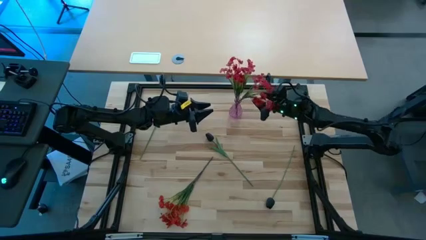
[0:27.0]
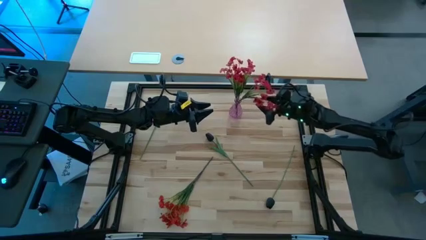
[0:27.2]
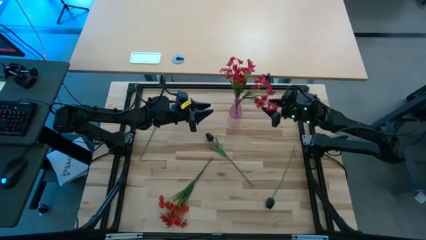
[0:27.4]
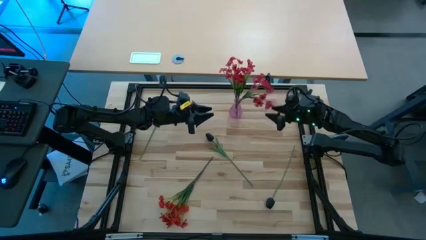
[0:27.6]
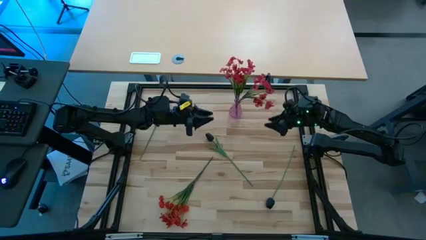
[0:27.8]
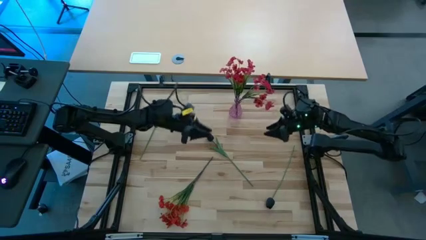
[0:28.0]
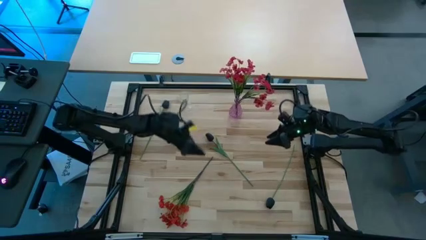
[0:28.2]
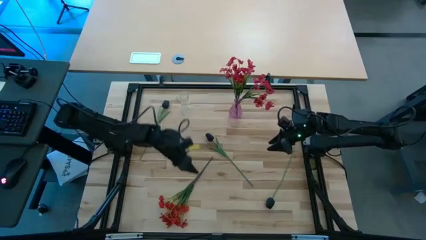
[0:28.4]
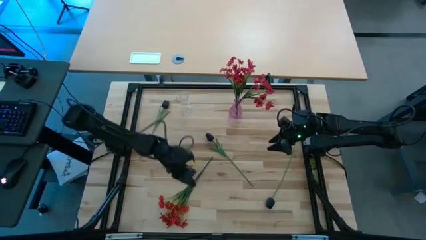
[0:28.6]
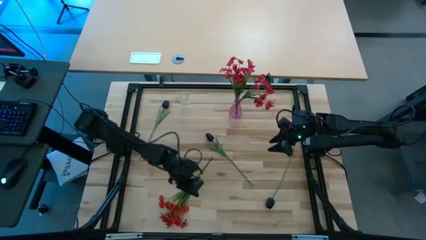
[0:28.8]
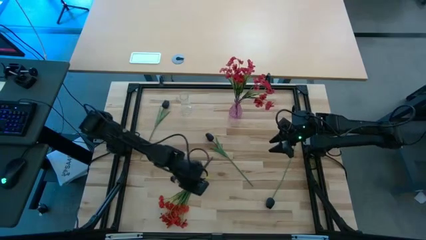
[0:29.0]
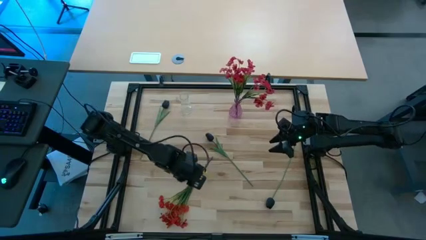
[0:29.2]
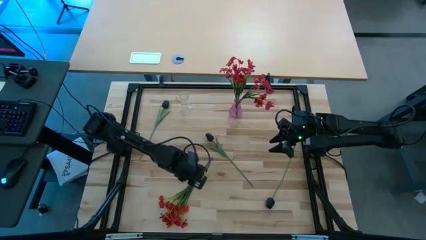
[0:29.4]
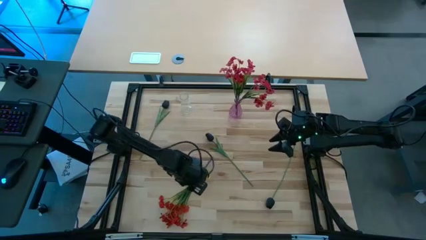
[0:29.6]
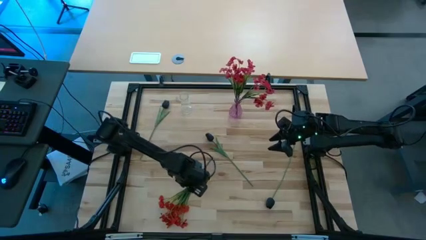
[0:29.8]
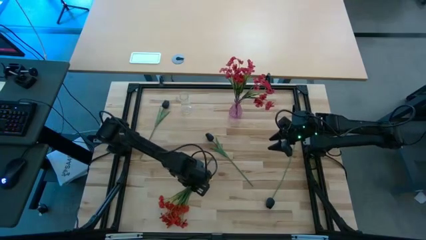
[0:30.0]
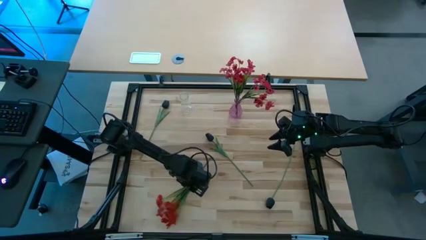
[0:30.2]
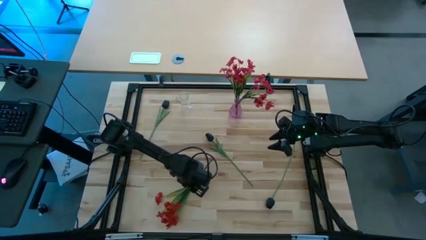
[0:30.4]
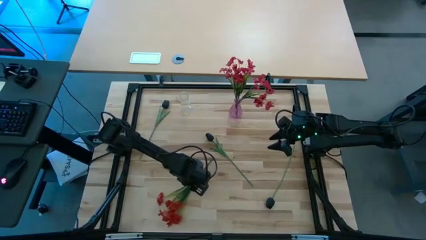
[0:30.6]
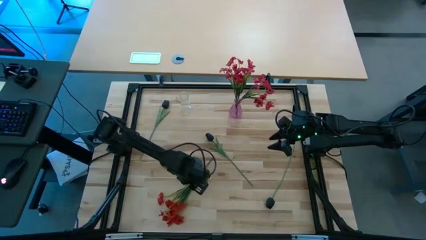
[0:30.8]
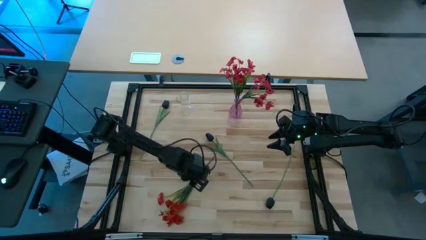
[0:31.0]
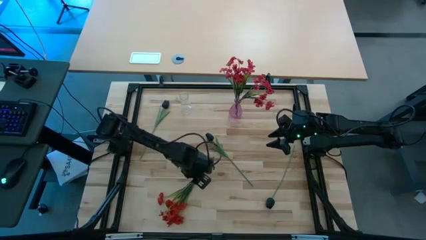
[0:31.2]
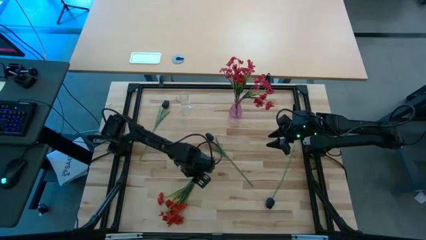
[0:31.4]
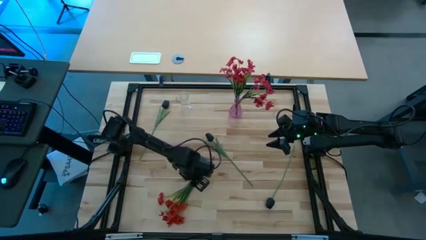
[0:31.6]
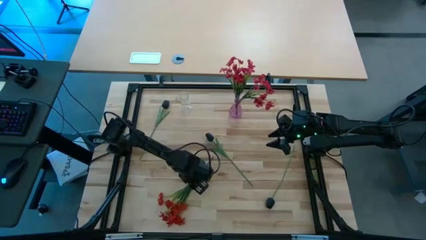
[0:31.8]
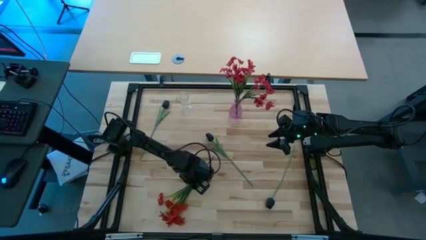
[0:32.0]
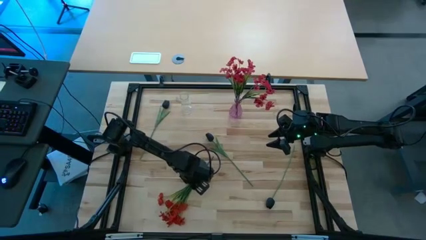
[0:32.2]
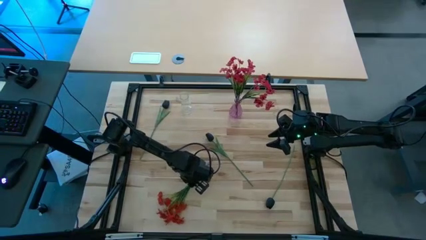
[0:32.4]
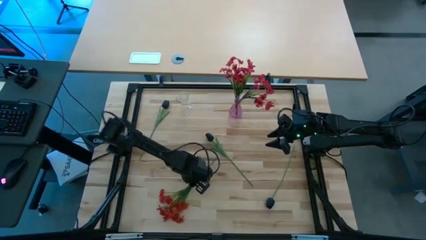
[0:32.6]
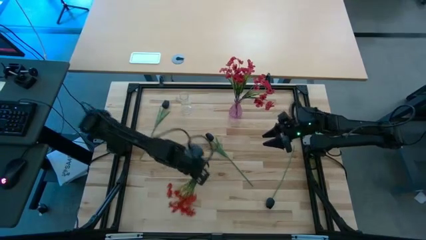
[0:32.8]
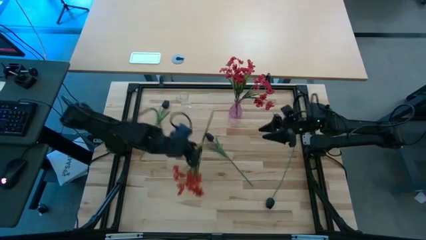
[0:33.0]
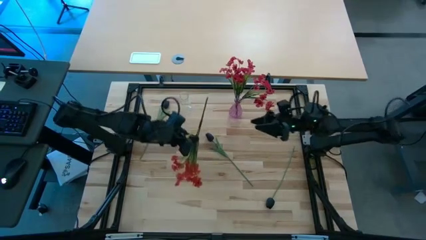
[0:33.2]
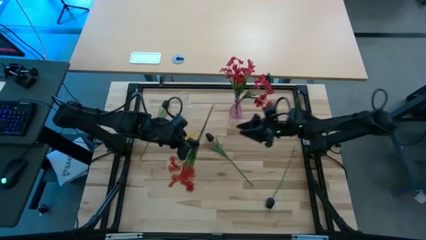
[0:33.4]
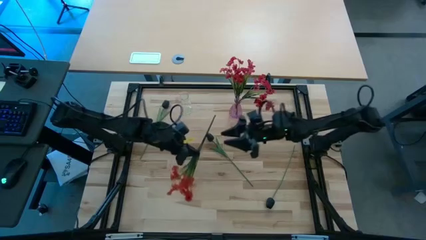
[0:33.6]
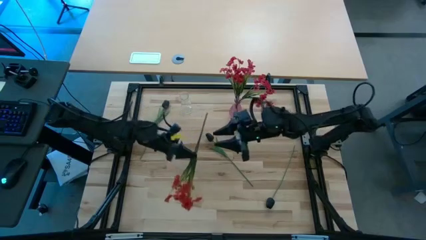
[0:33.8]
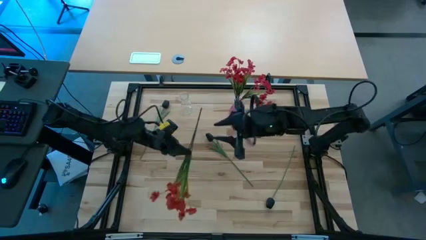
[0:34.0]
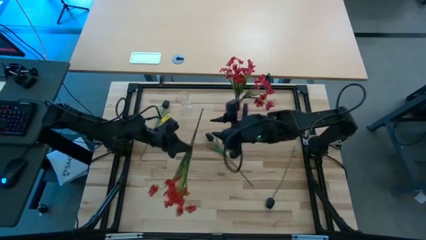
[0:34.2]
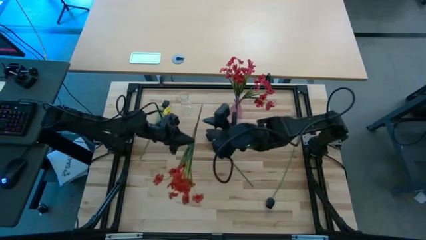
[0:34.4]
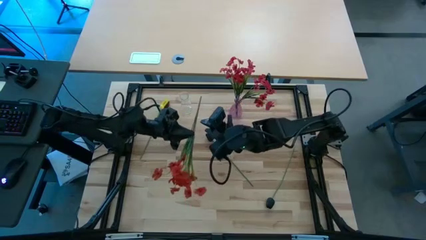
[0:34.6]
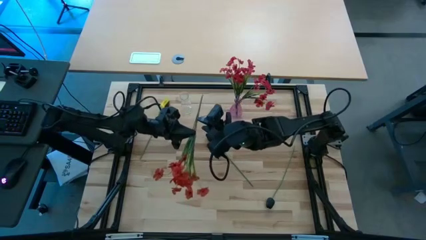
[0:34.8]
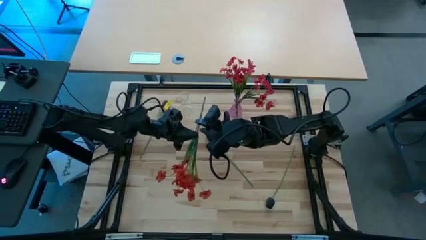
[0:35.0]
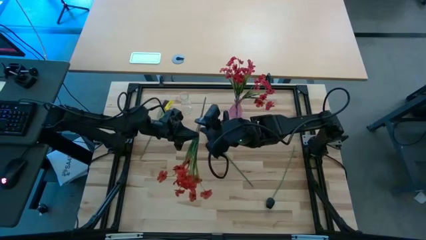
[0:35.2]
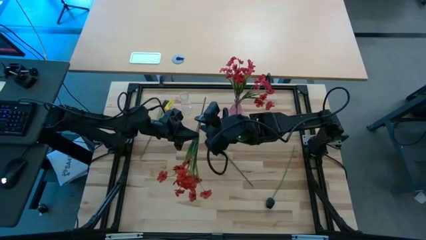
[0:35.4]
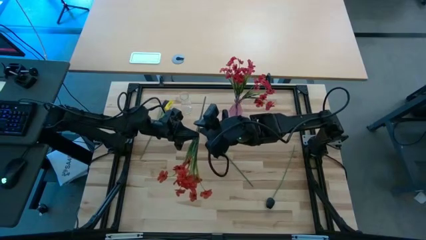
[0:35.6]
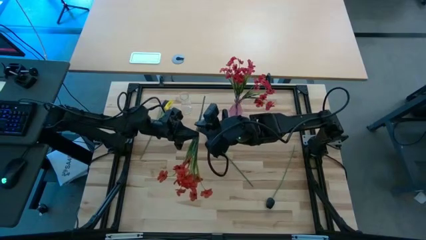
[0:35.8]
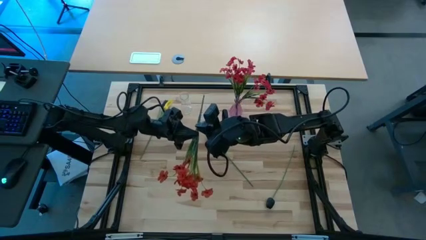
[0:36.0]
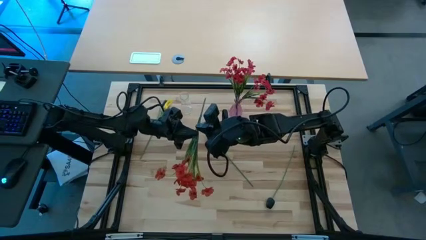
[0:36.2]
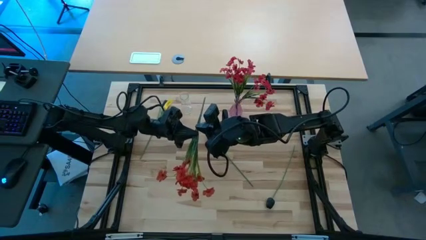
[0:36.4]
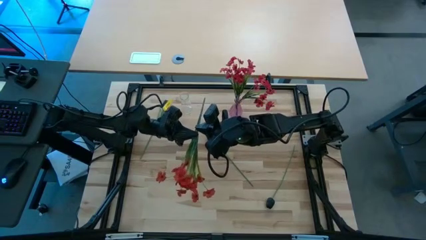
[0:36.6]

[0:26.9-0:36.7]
Task: Sort flowers into vase by color
Put the red flowers into the purple vase

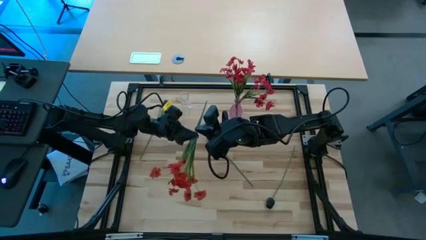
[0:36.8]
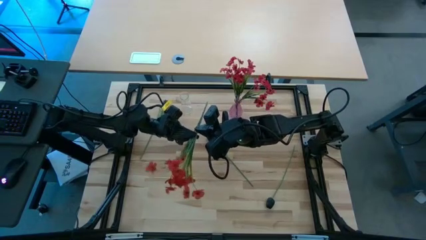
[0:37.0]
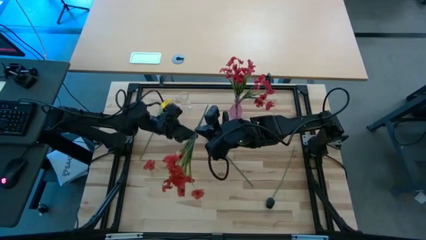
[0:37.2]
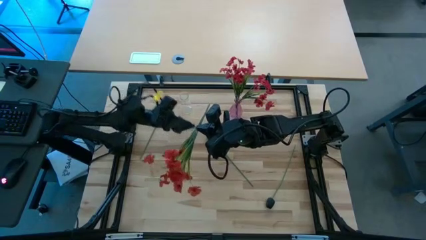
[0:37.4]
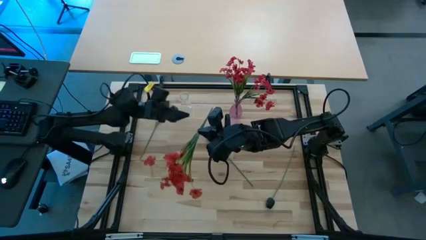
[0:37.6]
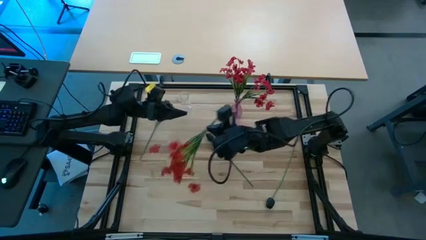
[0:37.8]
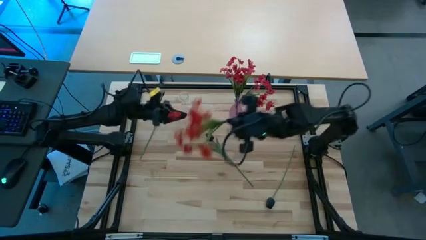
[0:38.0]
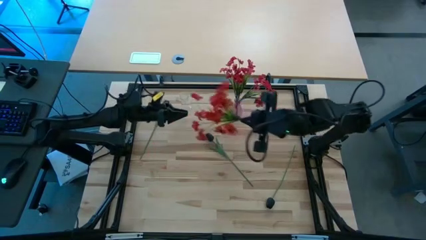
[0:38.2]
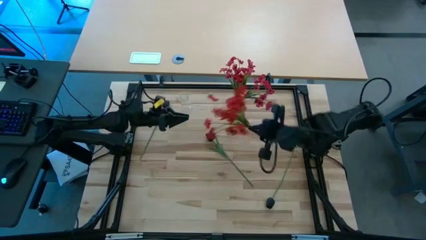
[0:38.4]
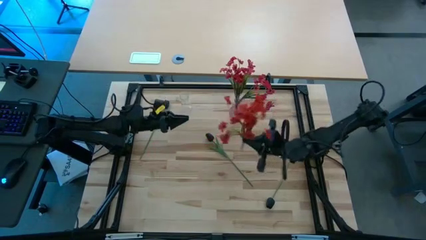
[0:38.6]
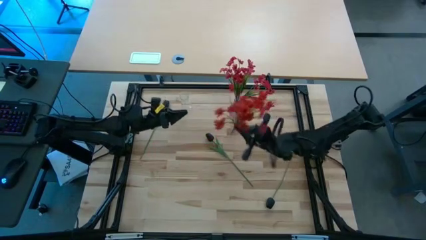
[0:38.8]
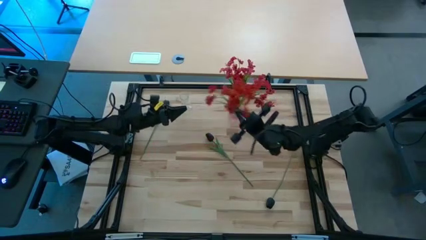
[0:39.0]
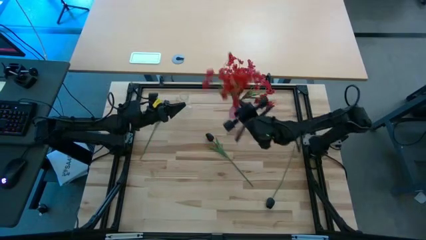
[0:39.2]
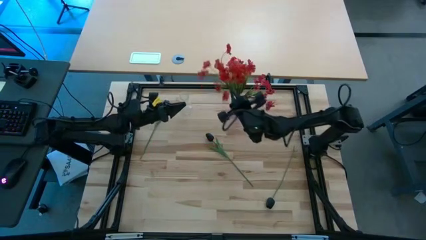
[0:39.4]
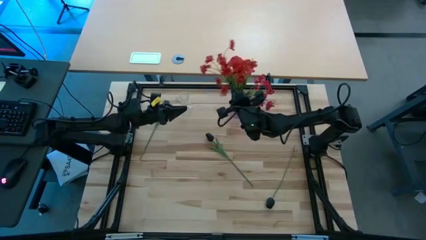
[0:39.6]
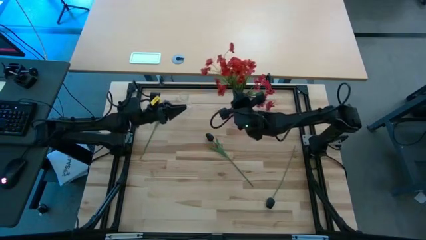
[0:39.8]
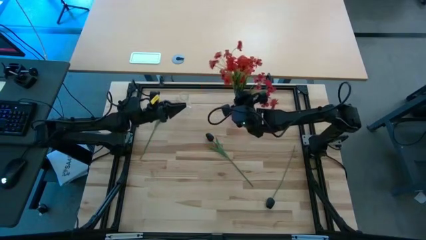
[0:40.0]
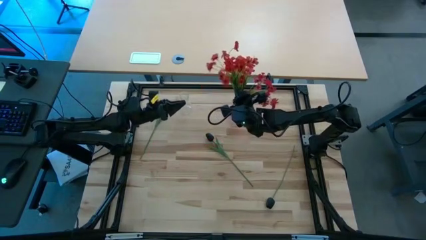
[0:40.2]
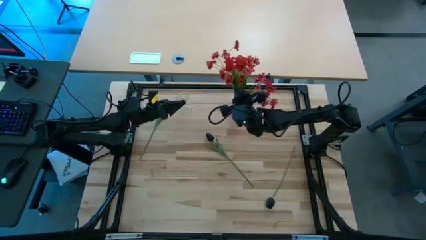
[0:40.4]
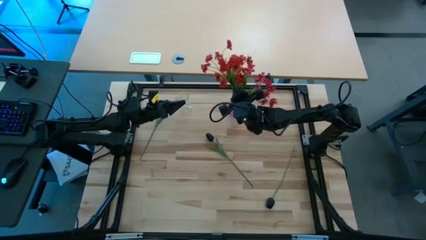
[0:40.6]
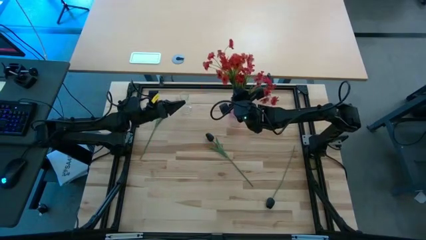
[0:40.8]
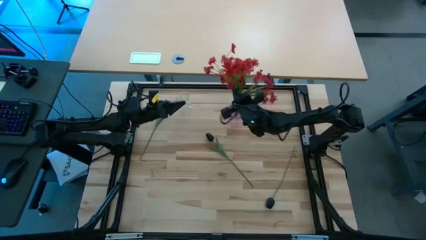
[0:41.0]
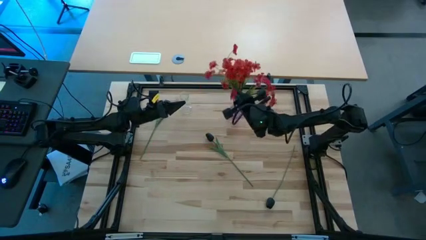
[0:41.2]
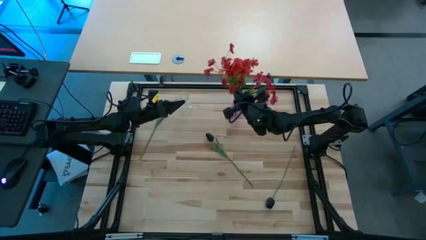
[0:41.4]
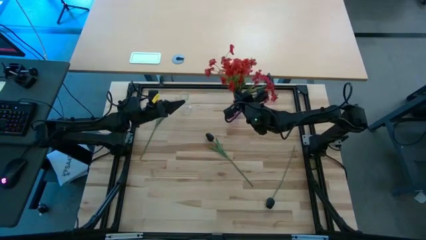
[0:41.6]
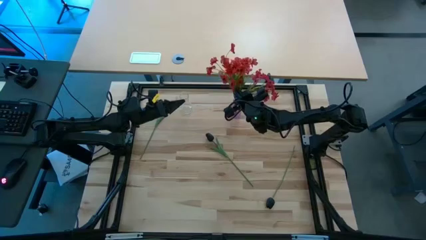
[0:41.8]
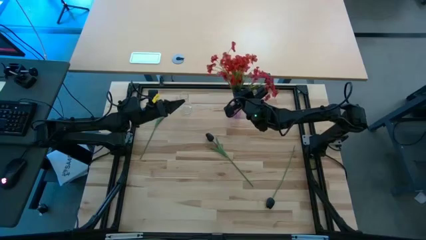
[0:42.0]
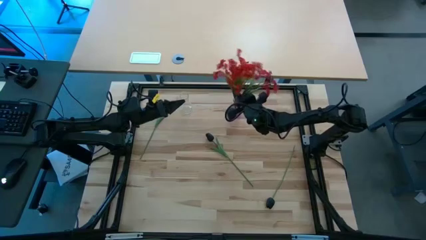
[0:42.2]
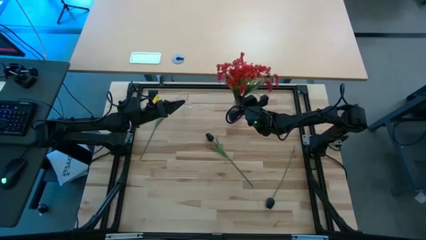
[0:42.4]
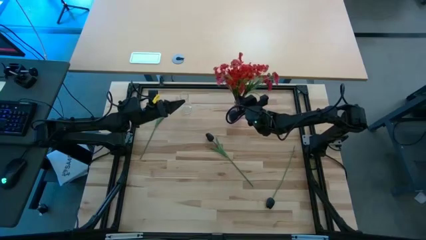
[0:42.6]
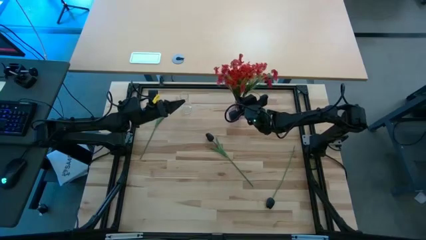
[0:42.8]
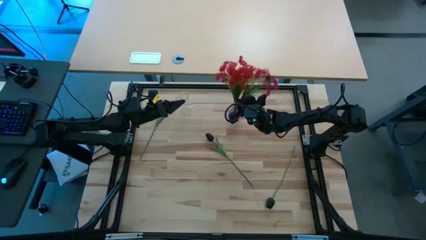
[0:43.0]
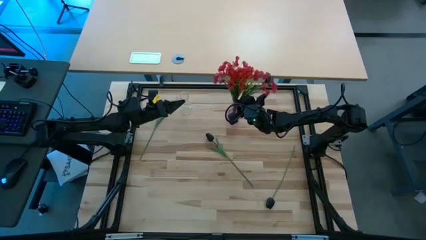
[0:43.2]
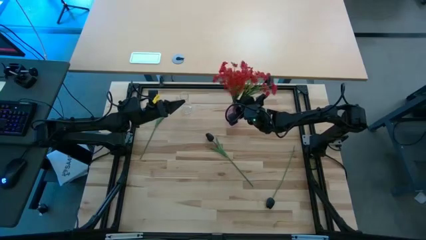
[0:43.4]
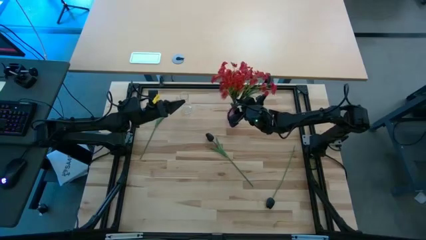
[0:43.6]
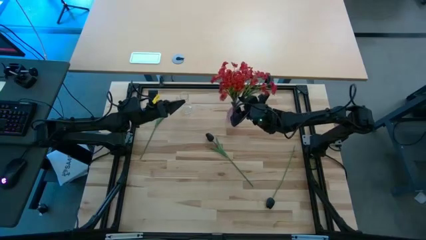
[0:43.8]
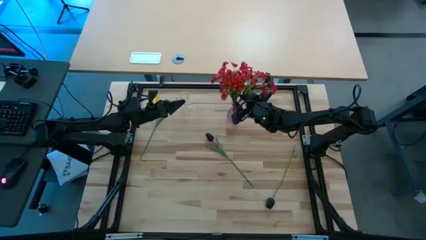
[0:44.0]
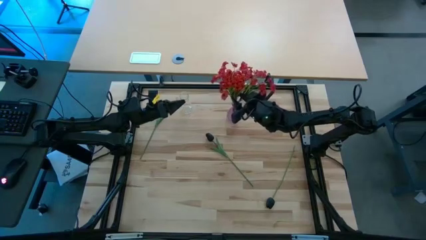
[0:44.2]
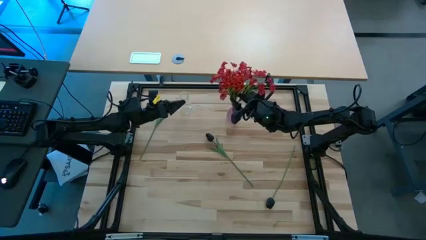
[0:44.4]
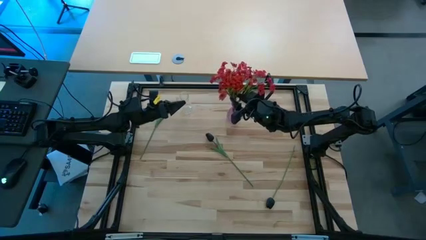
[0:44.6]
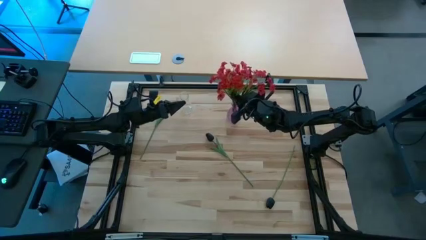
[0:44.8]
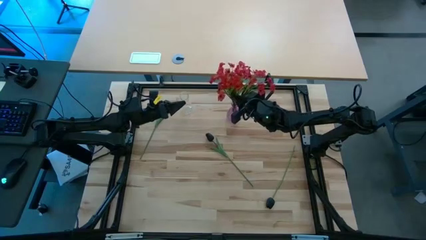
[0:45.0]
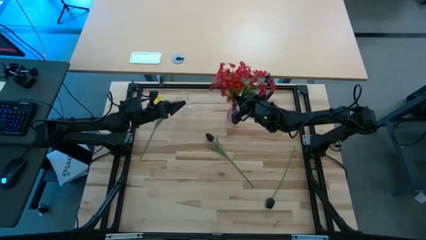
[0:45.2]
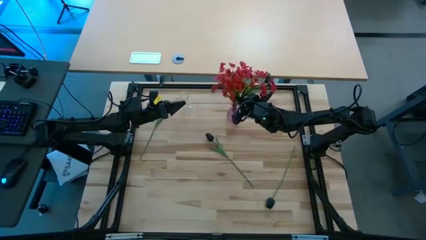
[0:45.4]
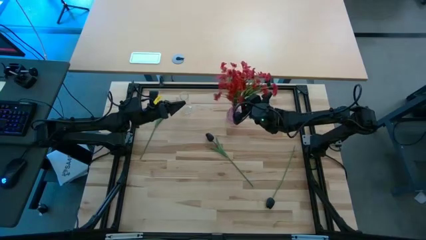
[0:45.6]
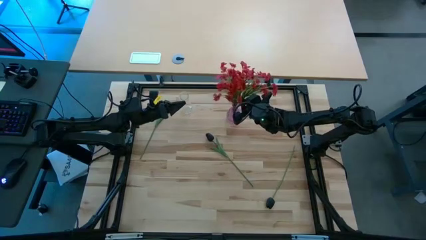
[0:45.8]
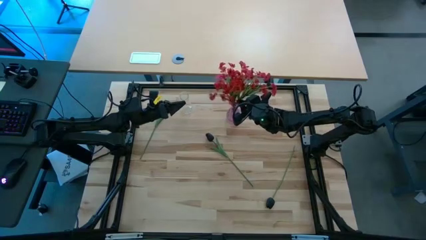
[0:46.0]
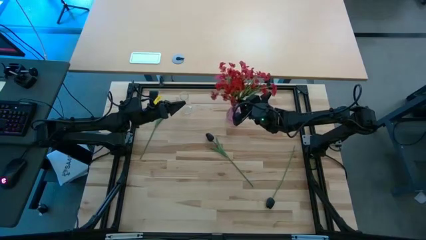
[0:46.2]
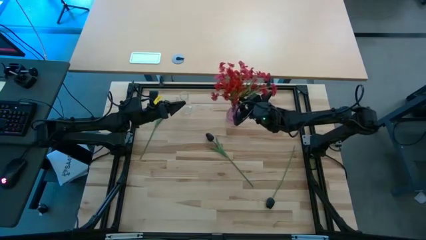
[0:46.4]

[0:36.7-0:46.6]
Put the red flowers into the purple vase
